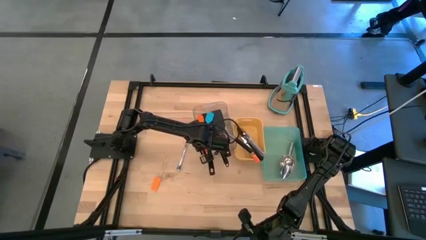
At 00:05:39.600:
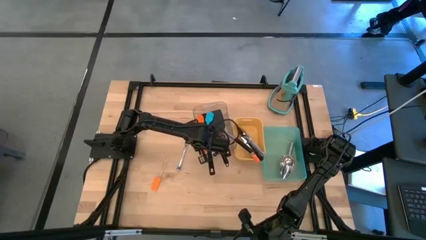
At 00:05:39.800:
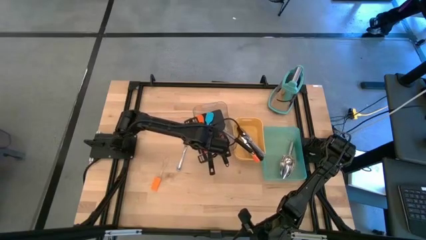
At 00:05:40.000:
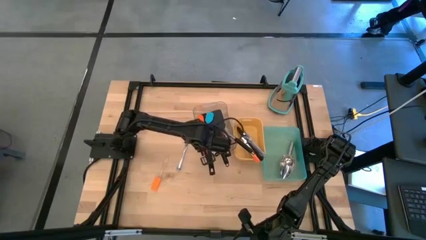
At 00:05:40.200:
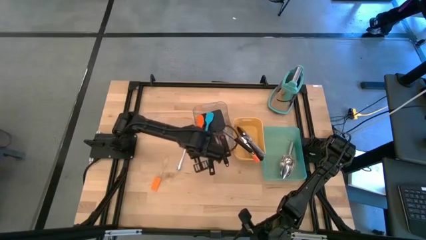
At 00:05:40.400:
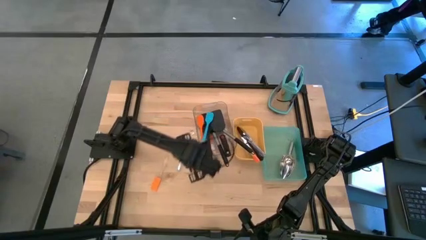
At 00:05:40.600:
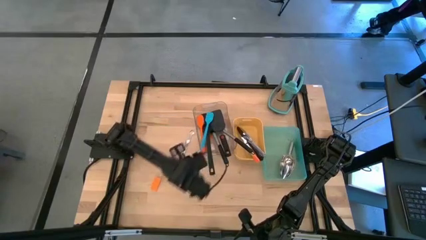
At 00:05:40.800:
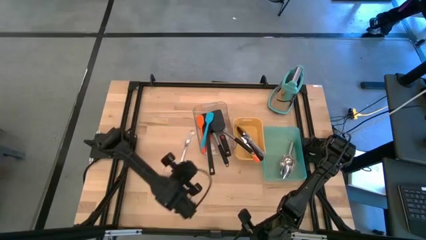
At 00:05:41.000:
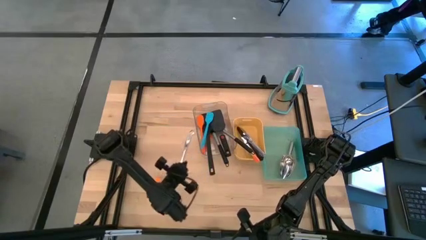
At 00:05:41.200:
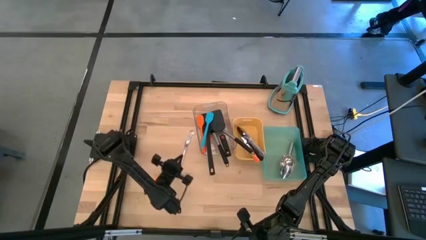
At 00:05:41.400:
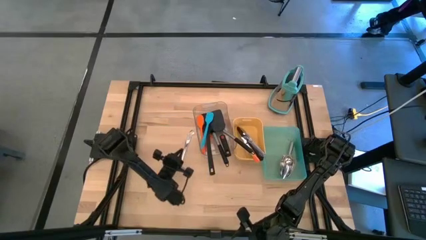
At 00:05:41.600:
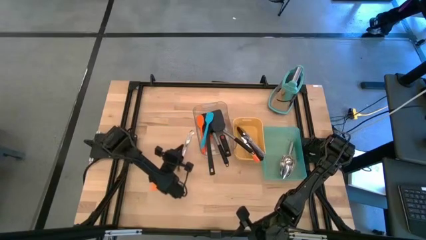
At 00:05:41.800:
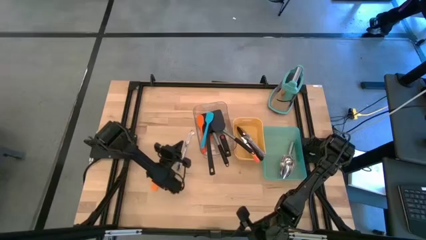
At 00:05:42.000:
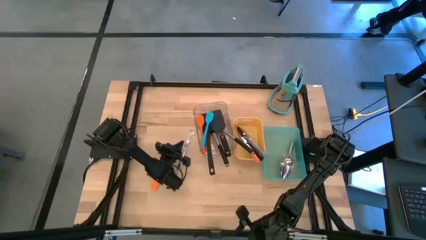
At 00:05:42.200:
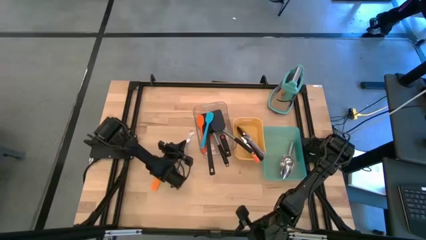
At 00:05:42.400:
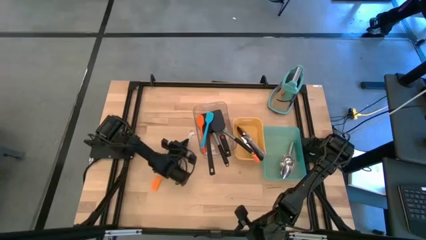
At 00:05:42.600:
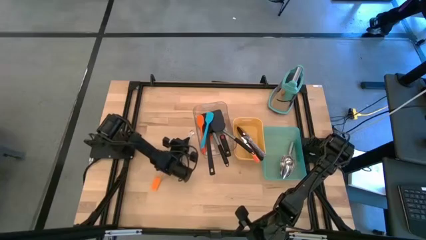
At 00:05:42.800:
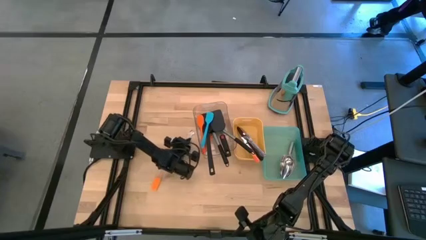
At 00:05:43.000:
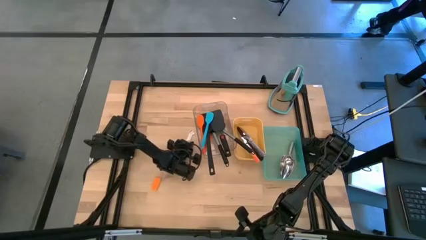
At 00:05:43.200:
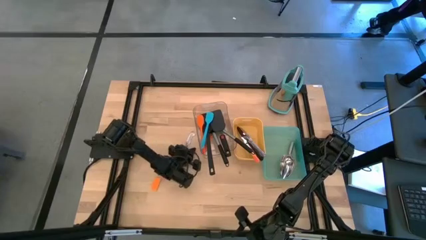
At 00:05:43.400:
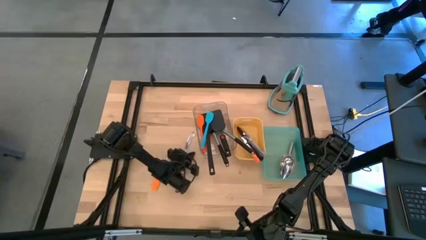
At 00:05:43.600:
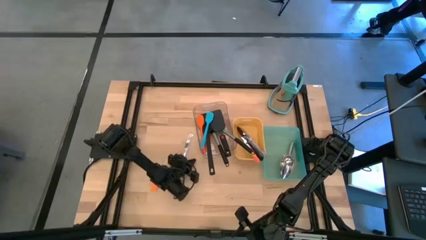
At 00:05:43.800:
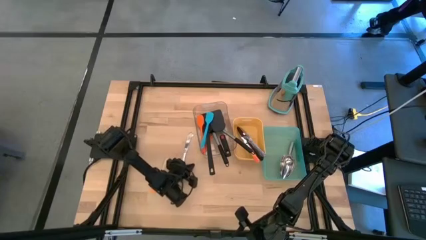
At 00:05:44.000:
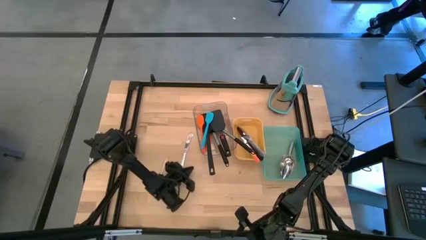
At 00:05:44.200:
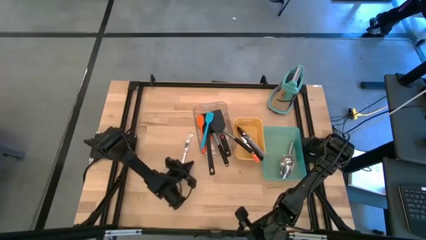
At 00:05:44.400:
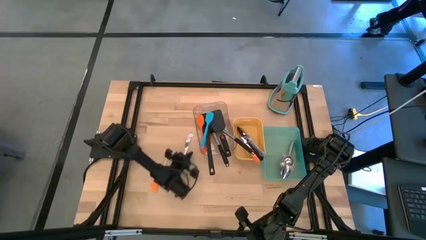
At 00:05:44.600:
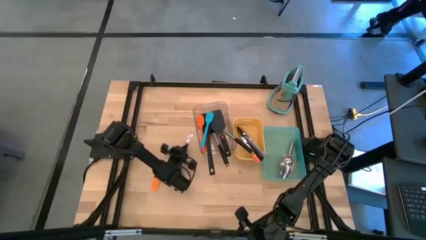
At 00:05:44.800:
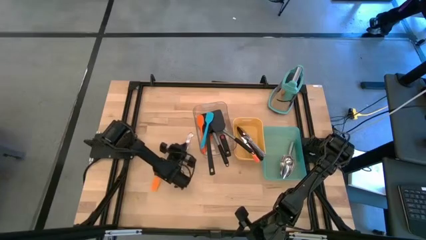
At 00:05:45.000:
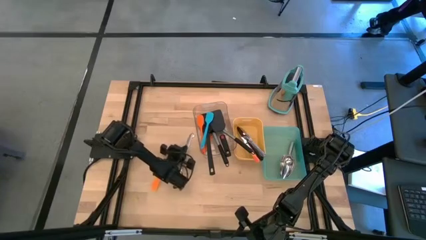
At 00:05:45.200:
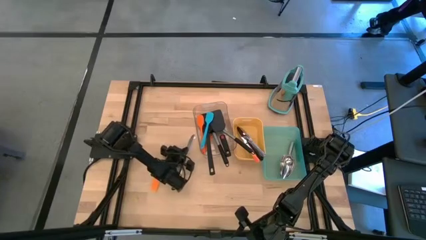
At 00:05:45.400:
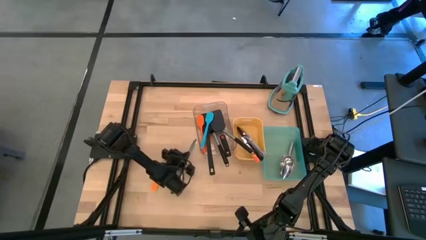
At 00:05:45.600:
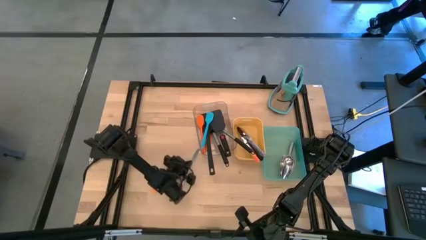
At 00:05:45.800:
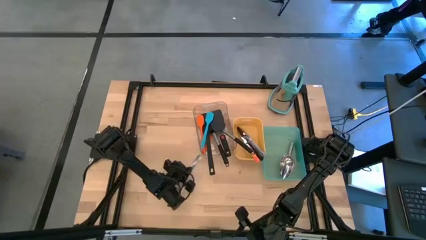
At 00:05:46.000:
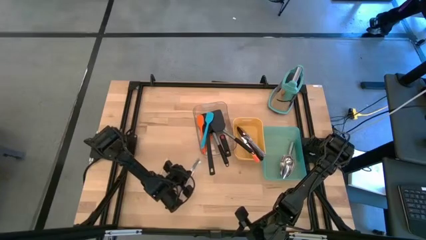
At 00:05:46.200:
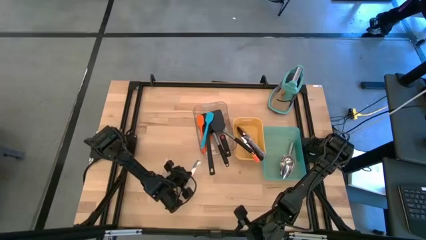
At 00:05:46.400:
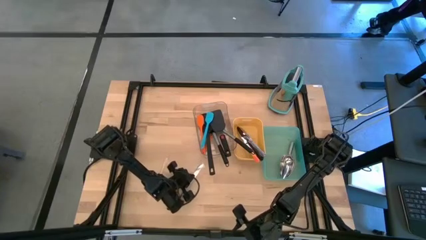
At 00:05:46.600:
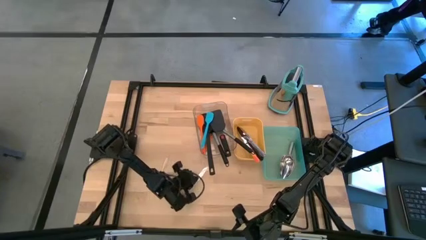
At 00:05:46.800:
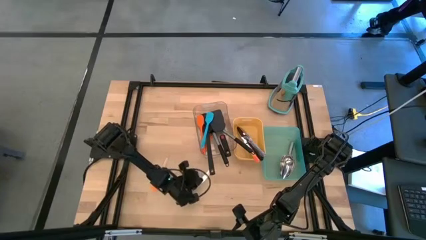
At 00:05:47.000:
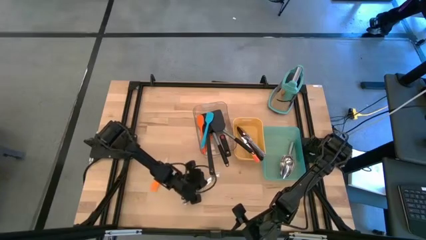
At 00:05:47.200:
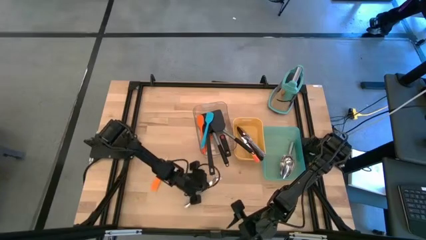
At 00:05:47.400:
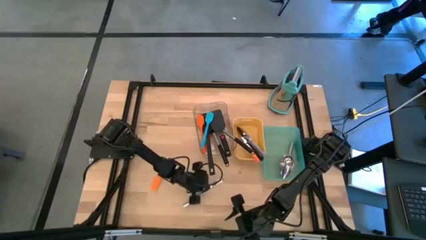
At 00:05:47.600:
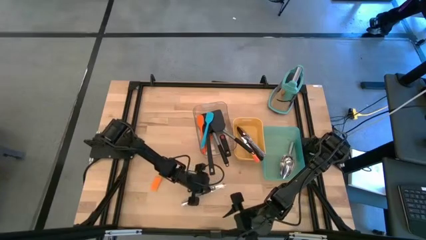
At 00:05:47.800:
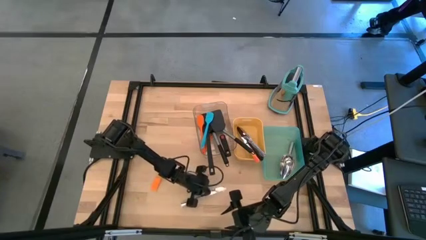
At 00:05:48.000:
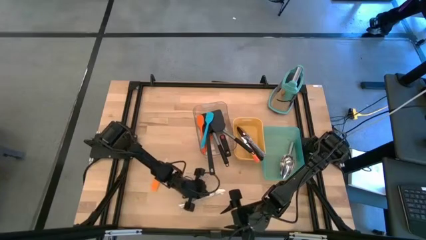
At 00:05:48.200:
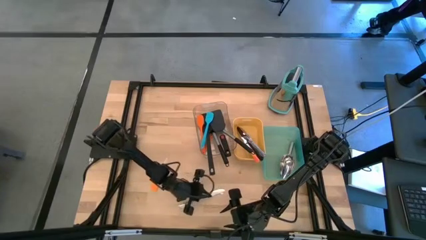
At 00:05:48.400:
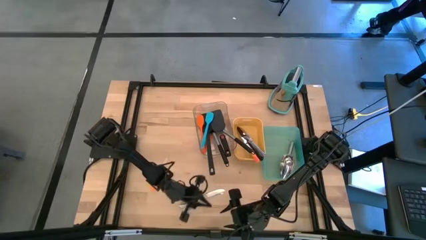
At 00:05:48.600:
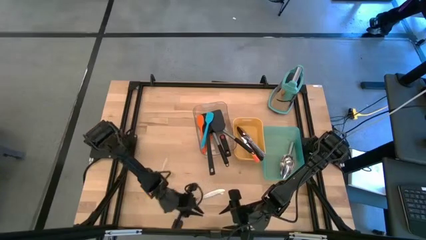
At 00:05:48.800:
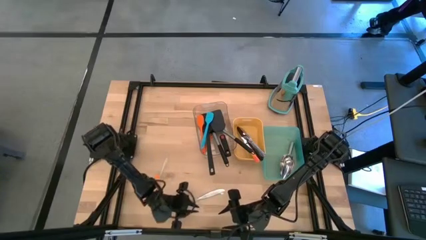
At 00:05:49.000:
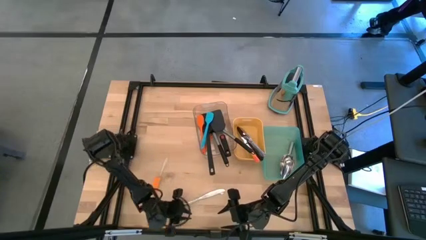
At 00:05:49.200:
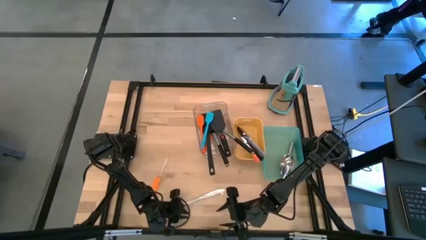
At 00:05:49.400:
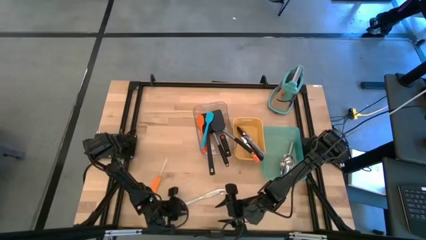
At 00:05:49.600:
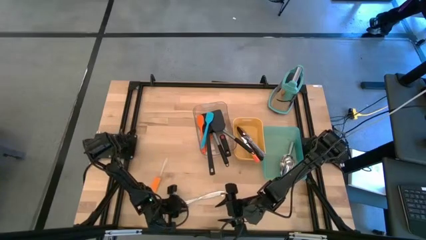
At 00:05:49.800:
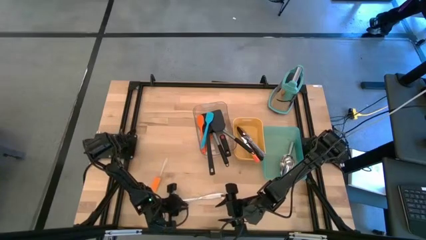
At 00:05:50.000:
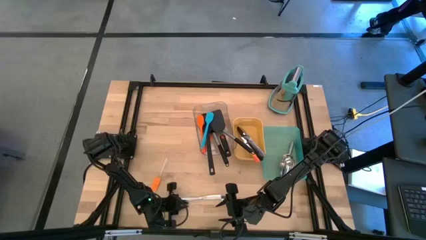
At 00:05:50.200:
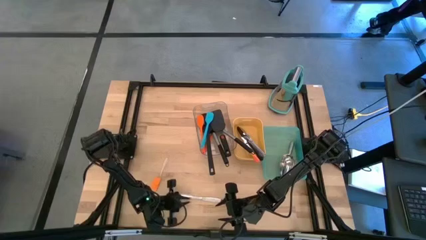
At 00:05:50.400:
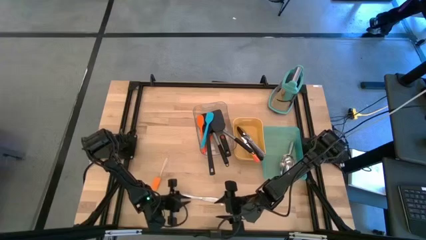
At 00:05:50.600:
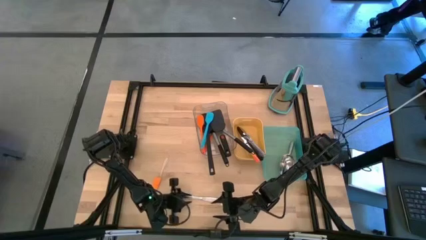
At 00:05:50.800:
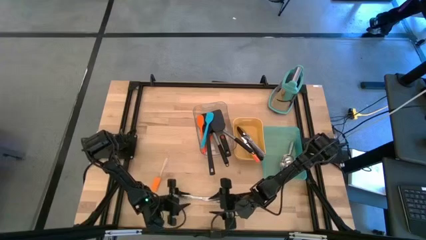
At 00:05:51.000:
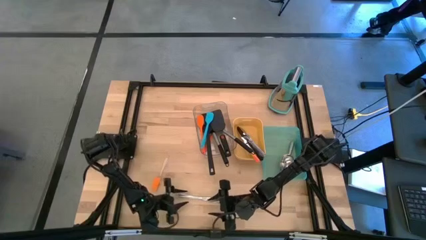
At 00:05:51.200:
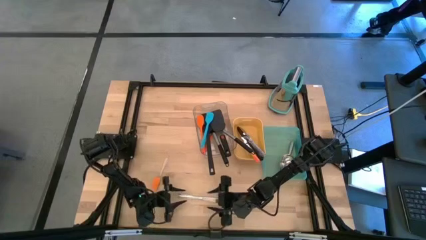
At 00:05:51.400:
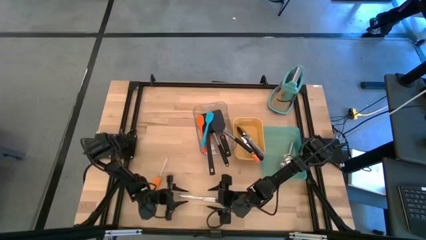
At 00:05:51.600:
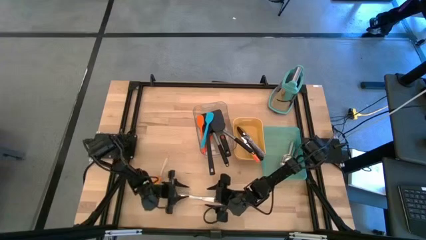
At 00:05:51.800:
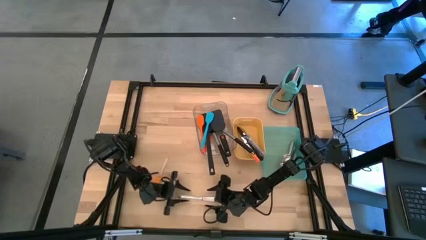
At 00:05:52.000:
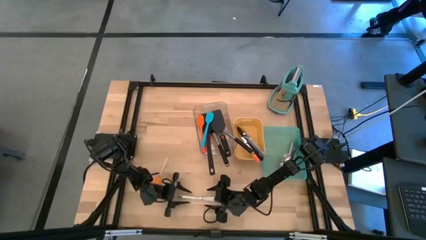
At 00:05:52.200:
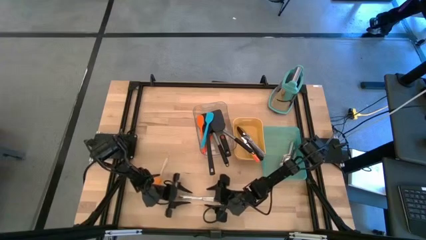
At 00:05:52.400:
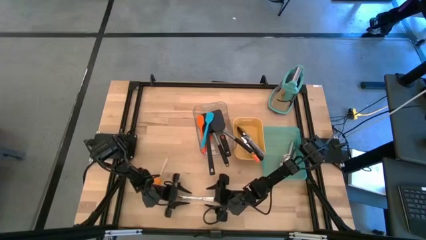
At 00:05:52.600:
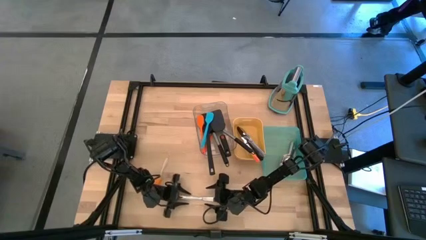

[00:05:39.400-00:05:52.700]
Task: Pick & Place Kitchen Items
Put the silver table knife into the yellow bin
